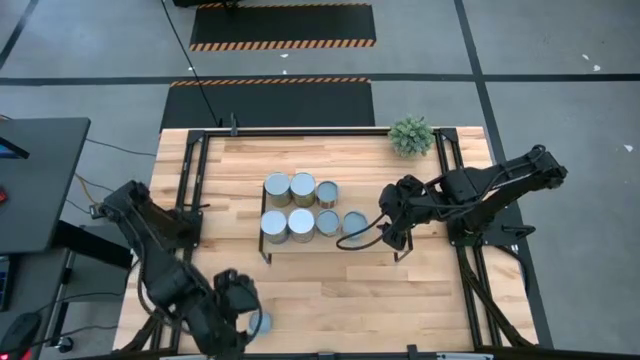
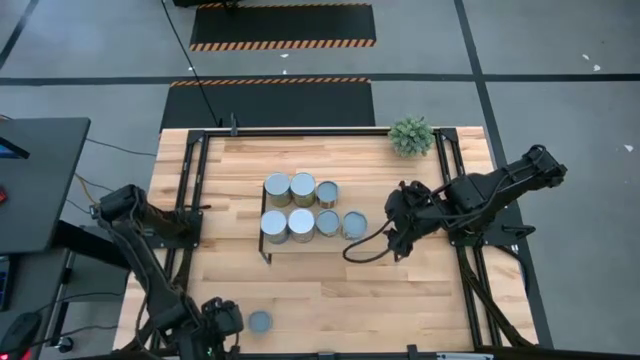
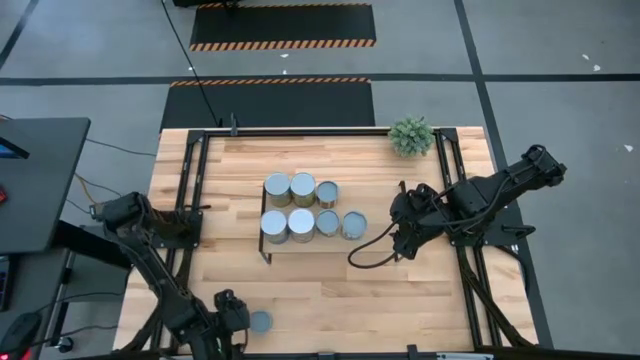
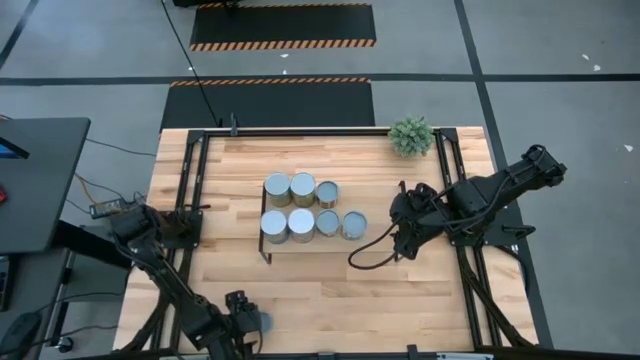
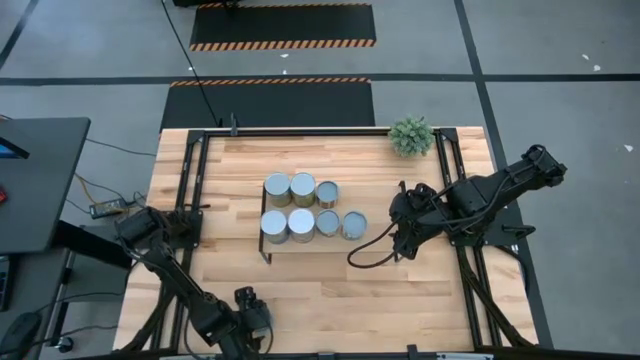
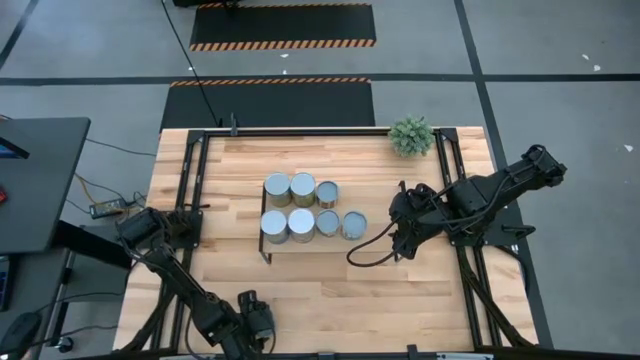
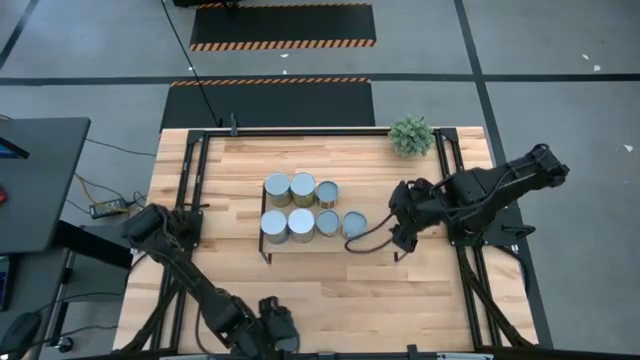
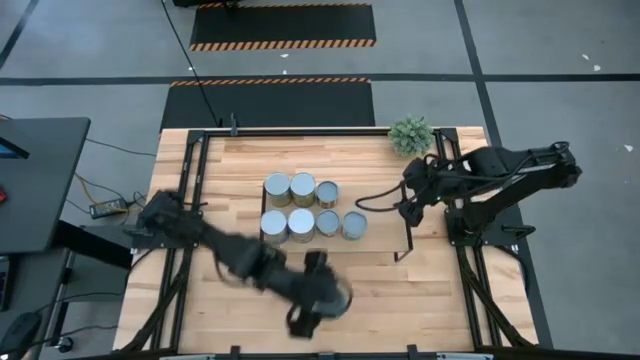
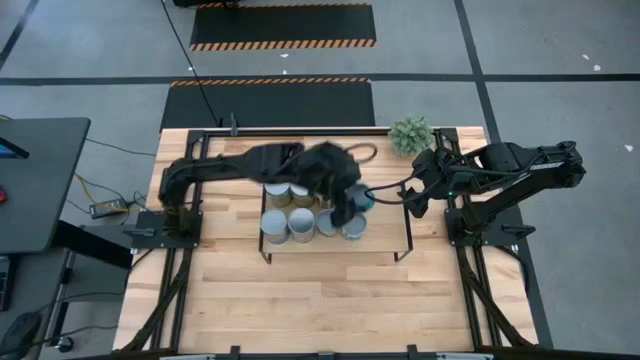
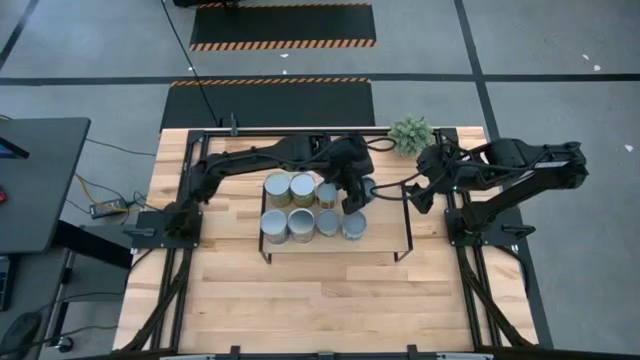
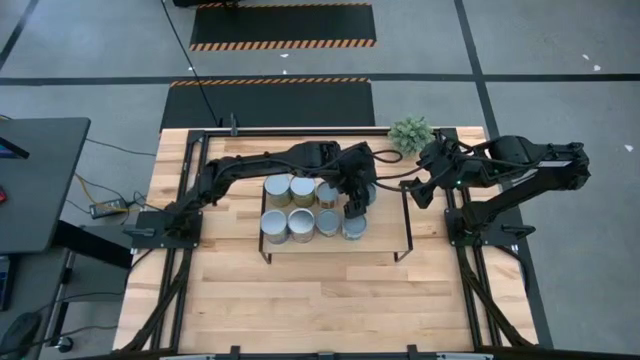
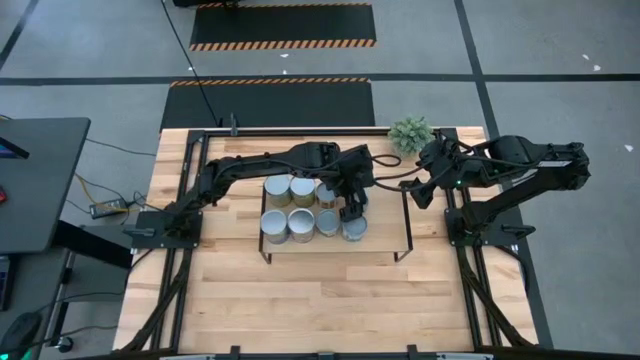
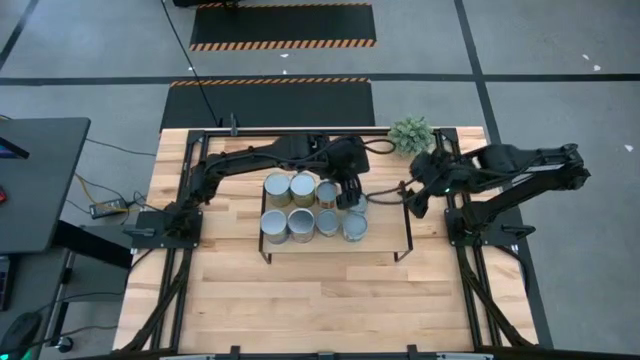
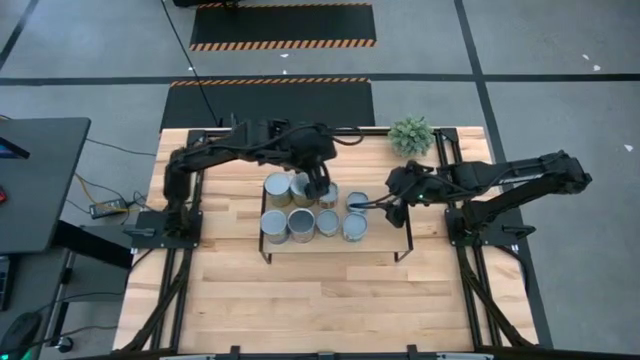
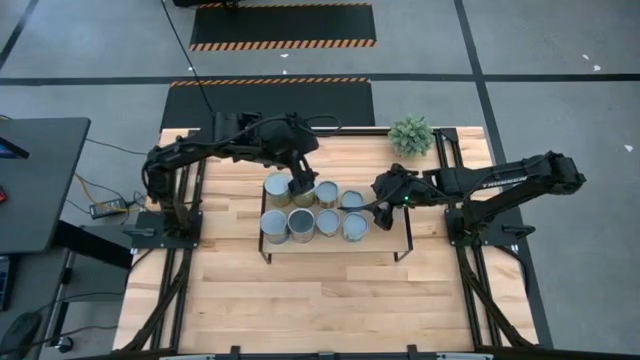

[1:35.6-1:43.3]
Task: Pick and place cans onto a shelf
Put the canned tuna on the shelf

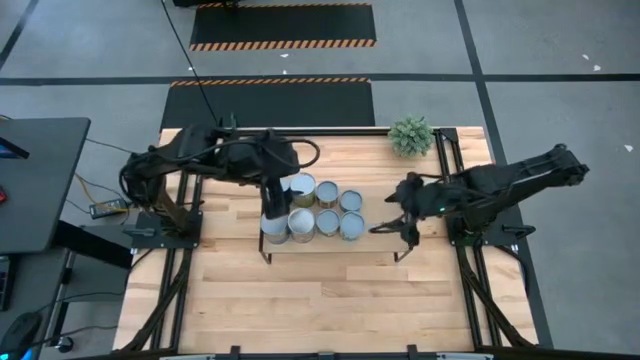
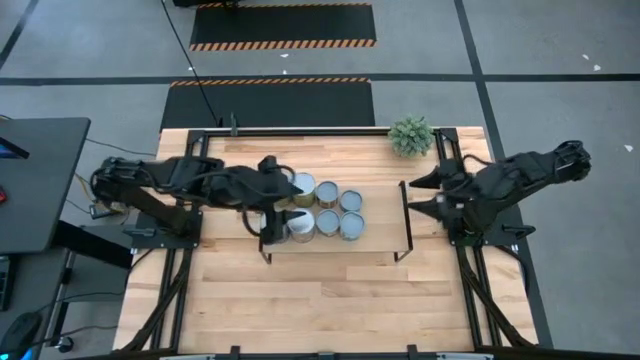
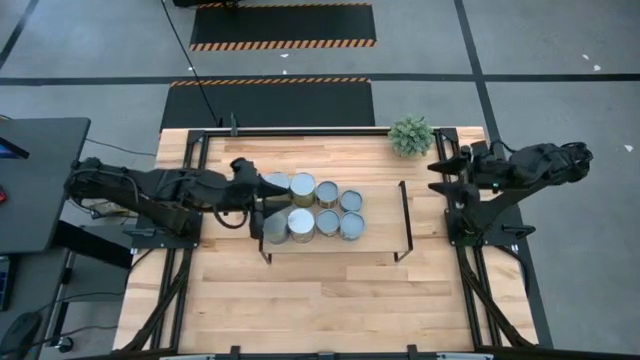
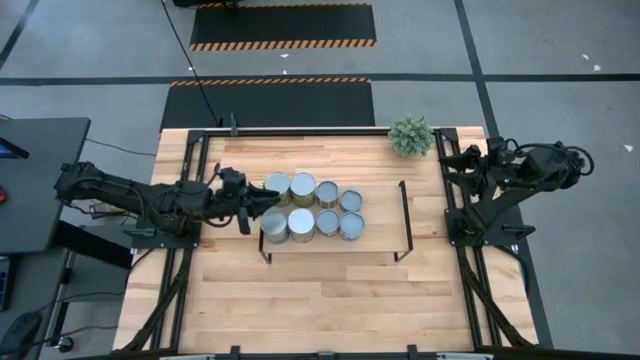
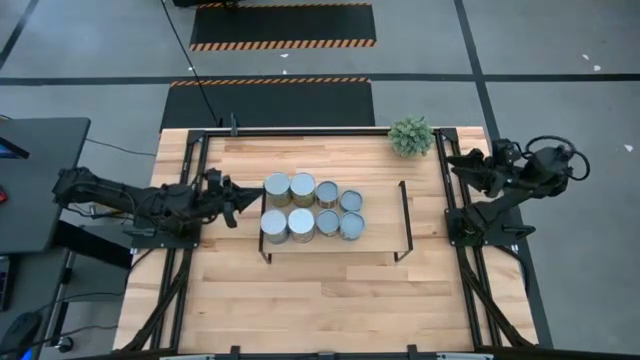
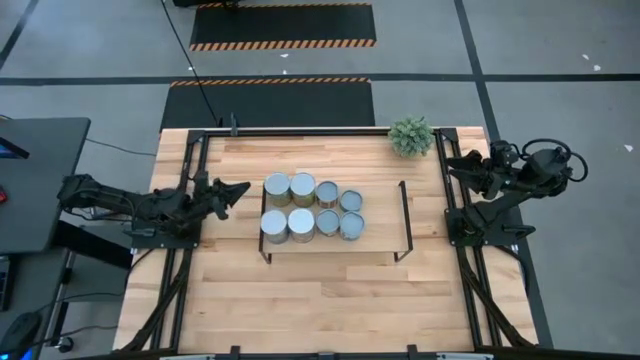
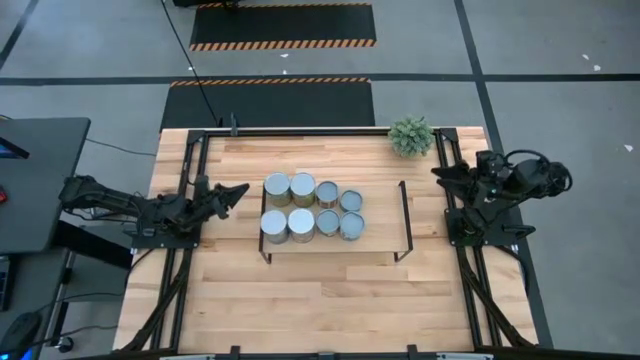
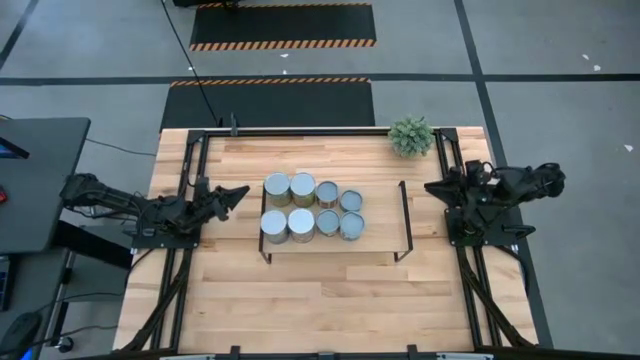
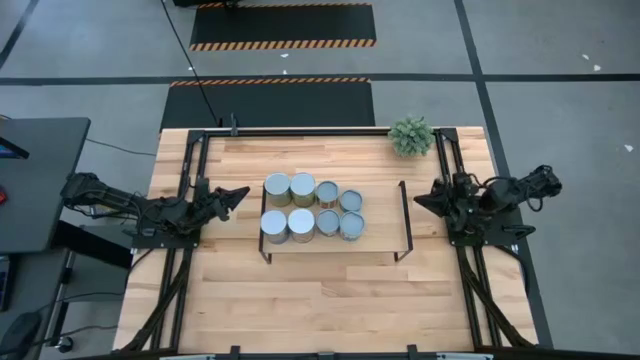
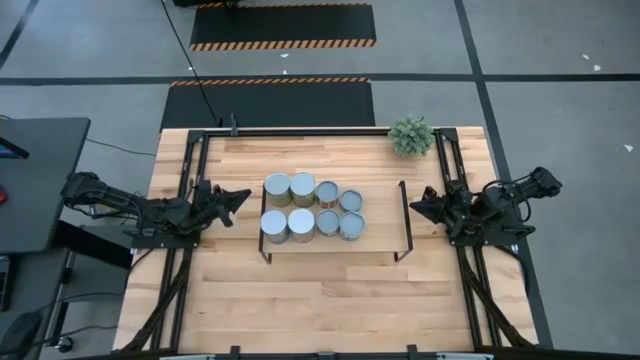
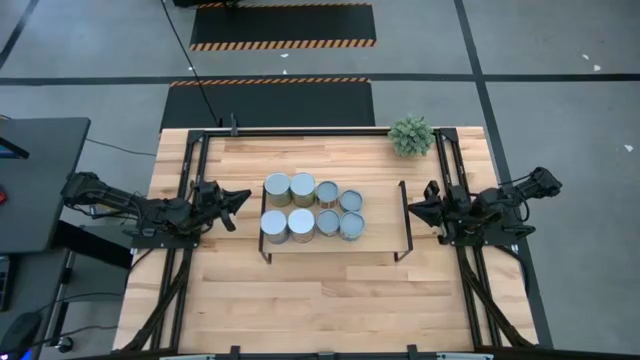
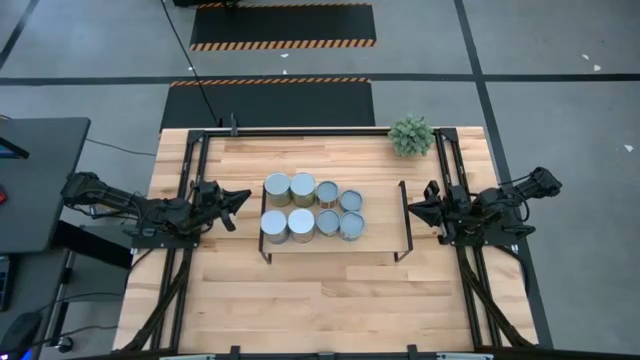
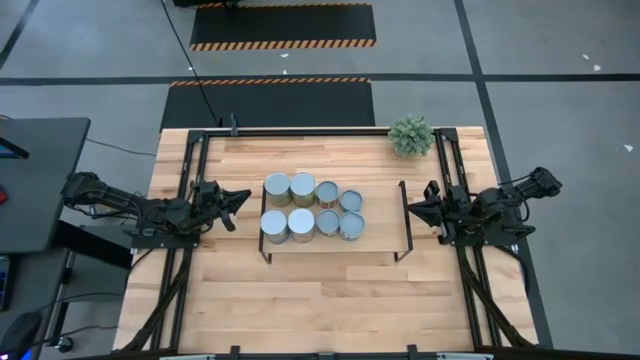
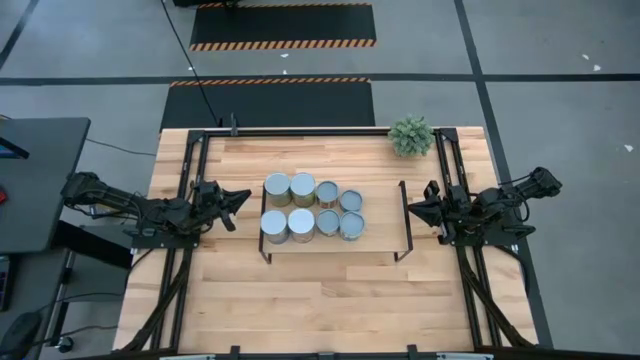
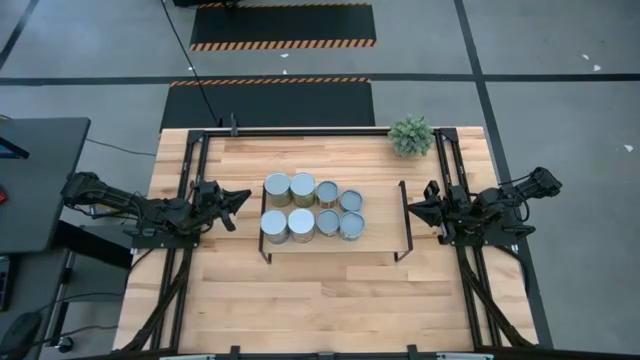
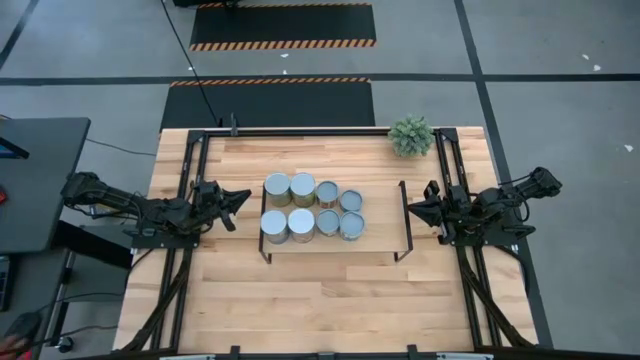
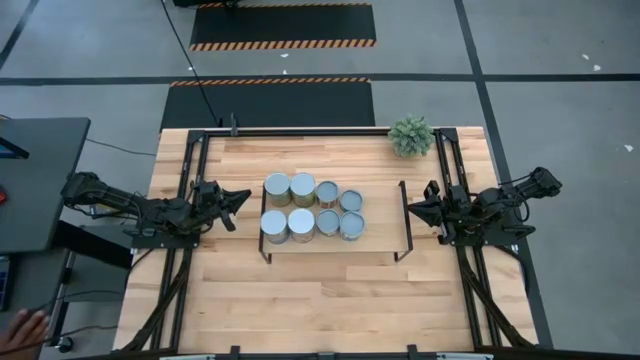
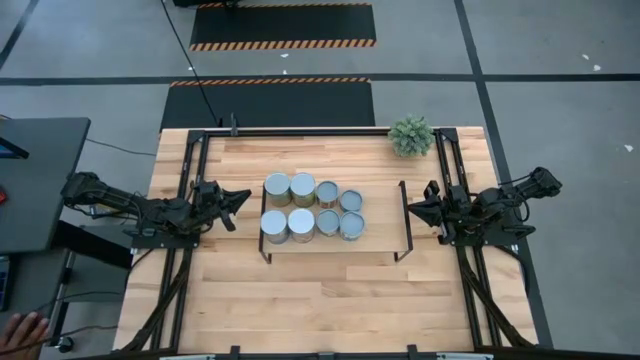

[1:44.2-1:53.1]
Return to Home Position

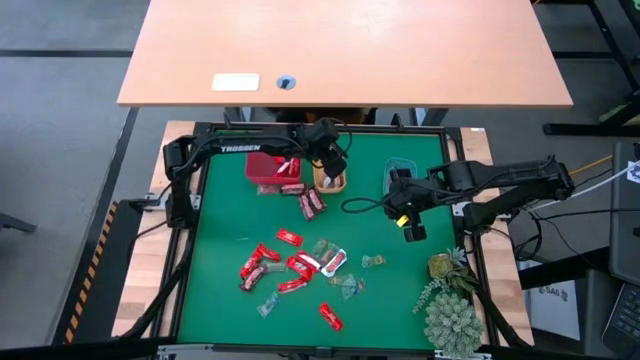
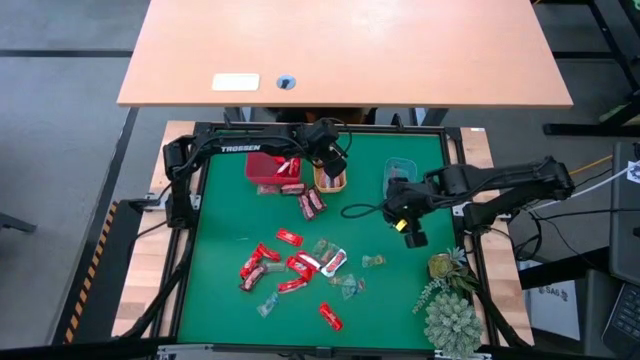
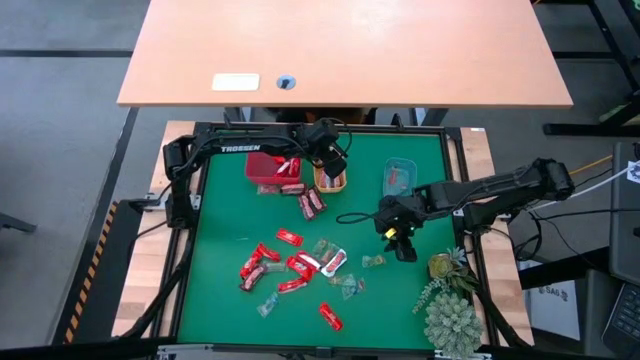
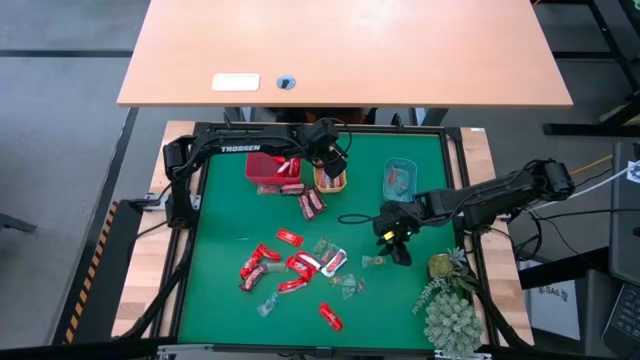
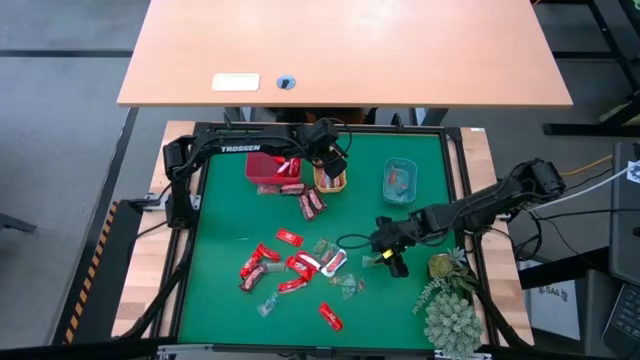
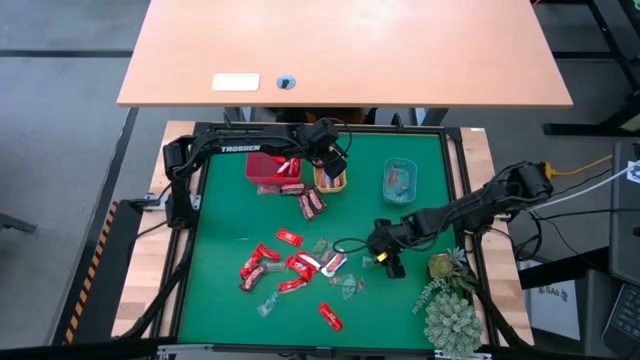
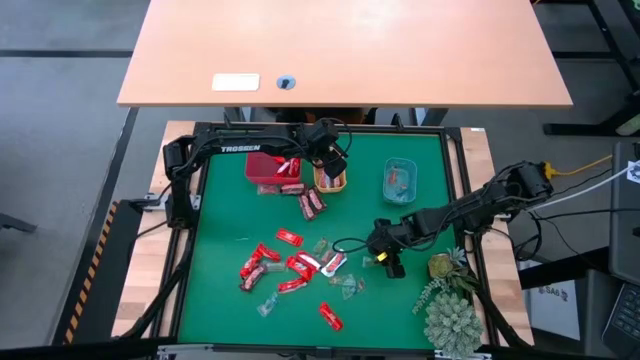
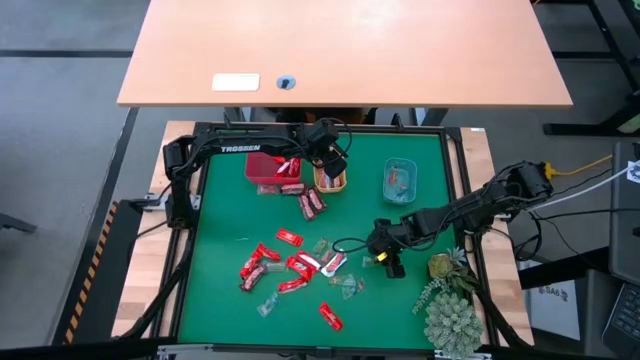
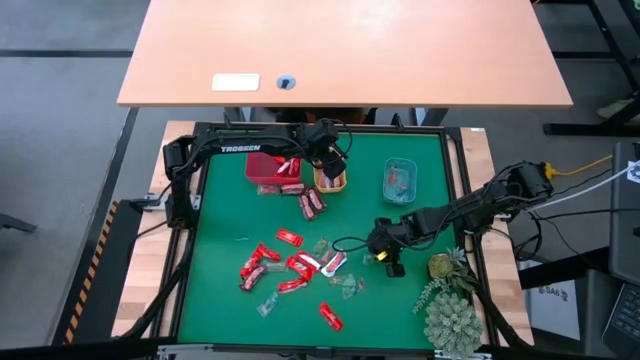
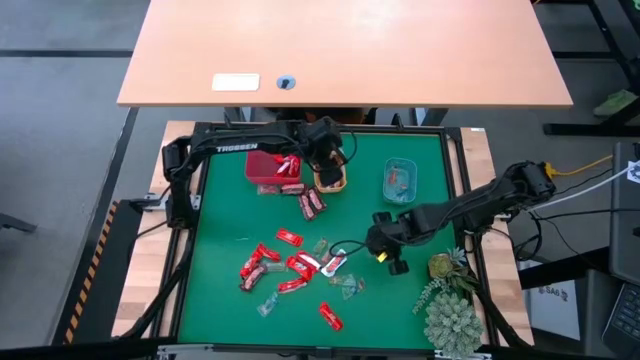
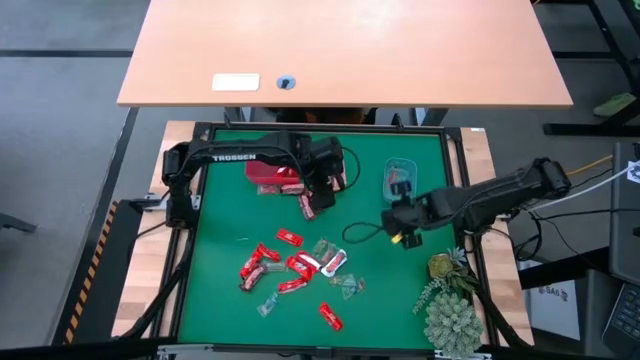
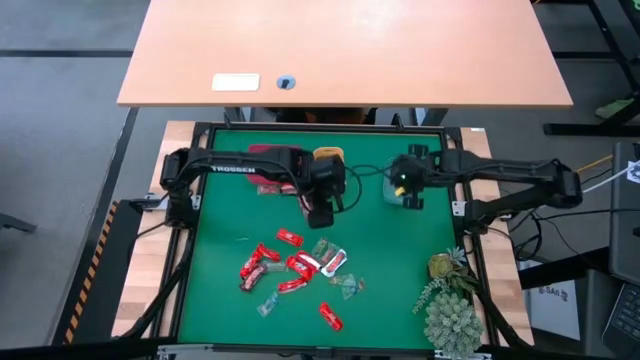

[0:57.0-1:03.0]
Task: Sort candy
Put the green gummy into the blue bin
